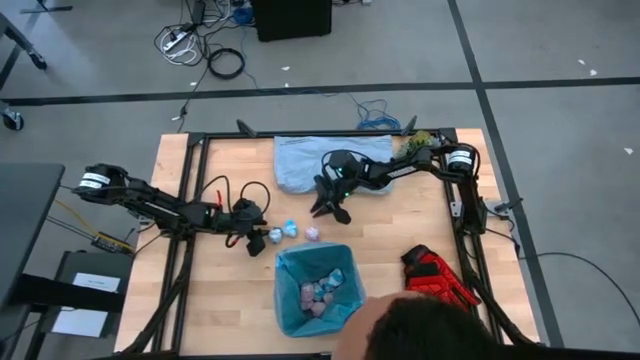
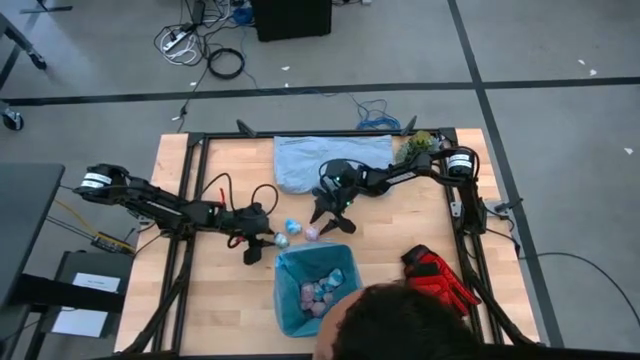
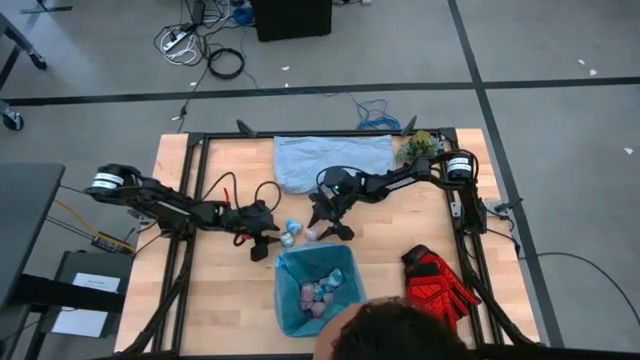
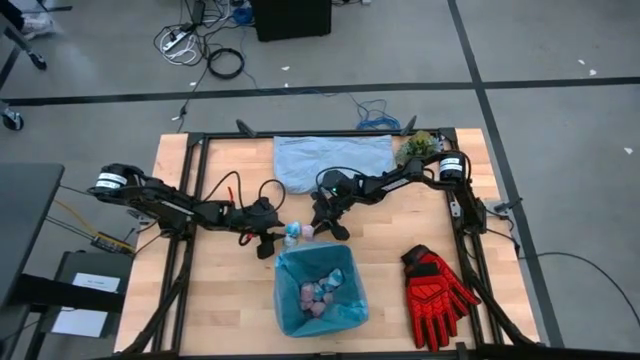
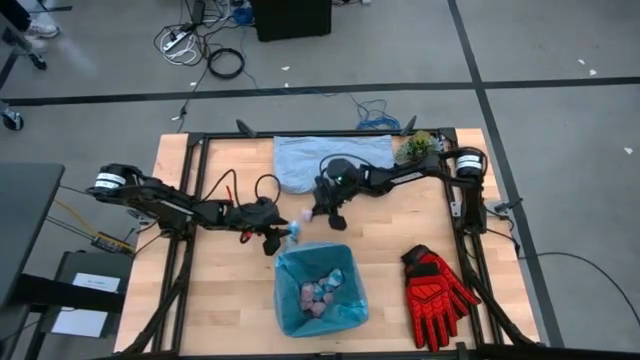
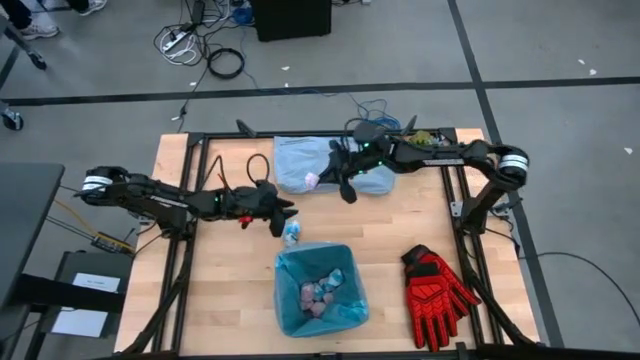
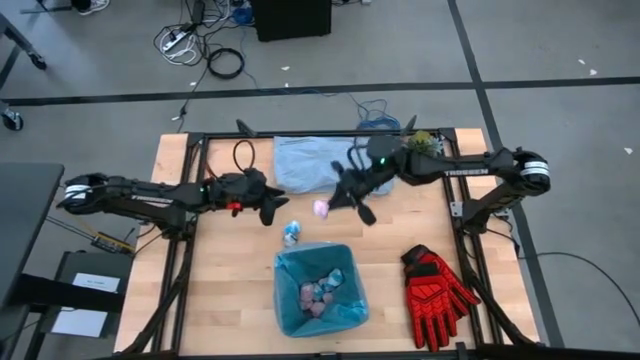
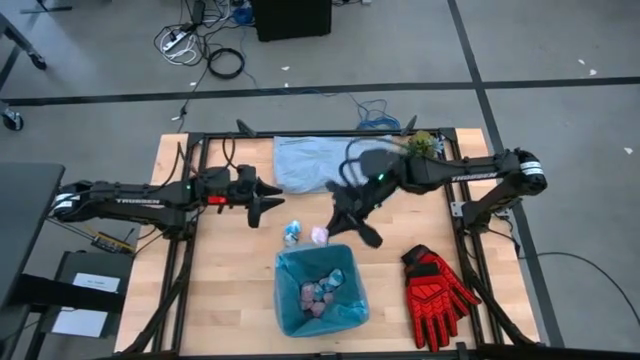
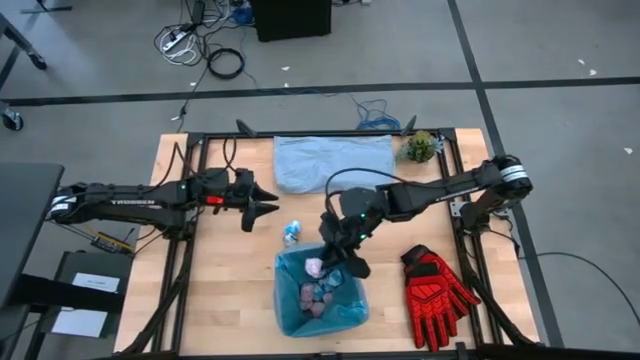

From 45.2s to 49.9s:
Task: place trash/remove bag and relplace
Put the pink crumbled trash bag into the trash bin

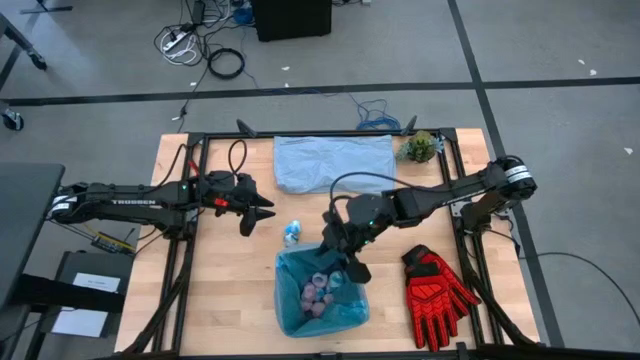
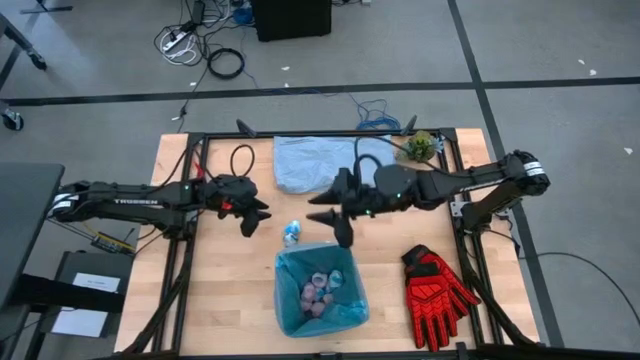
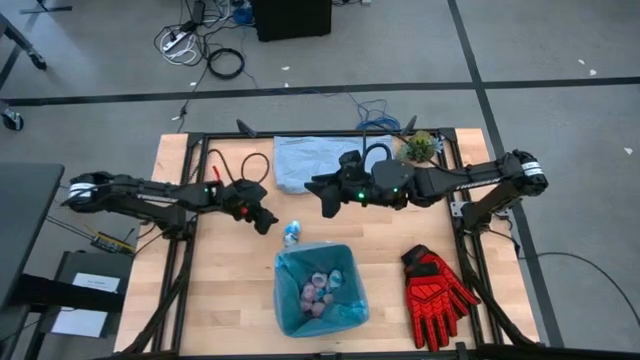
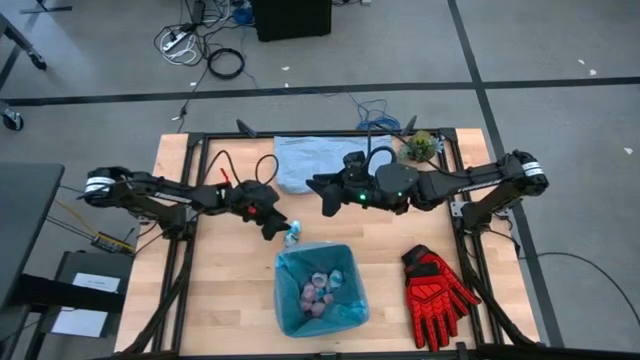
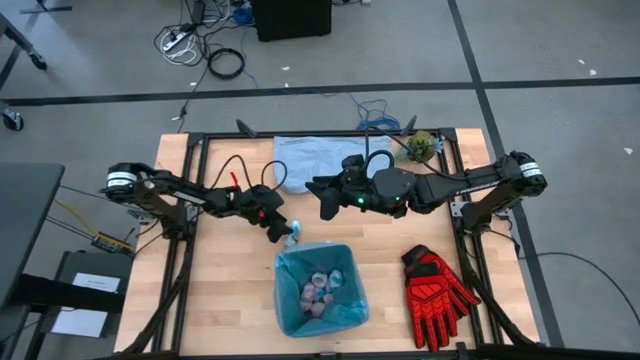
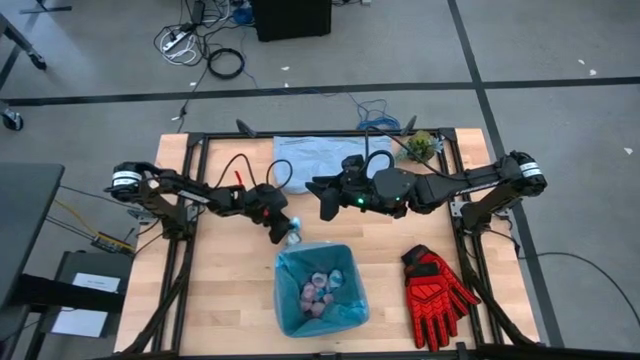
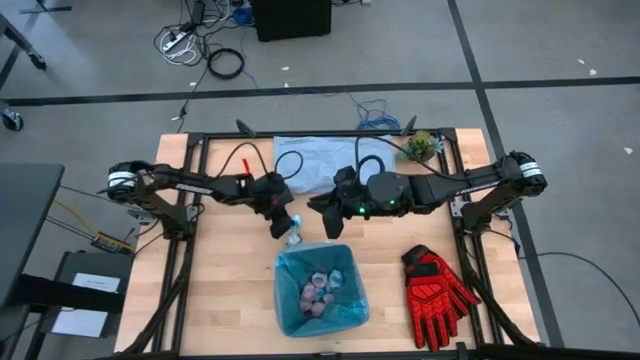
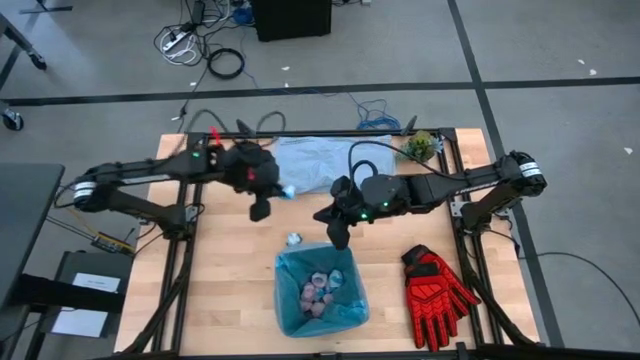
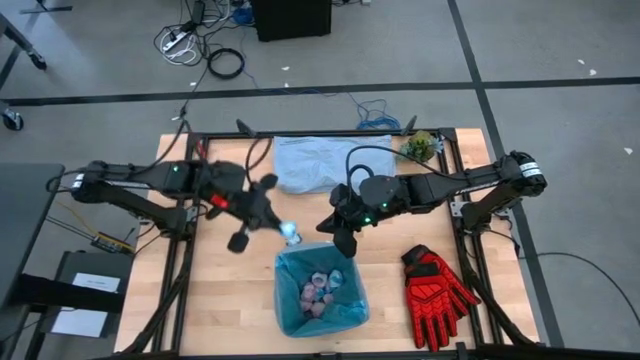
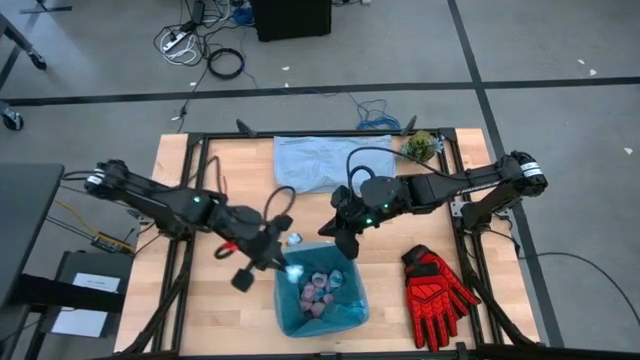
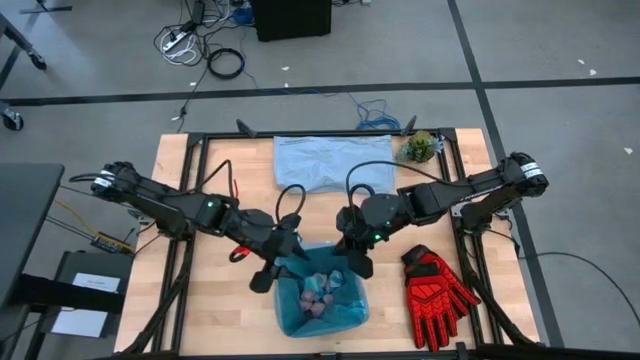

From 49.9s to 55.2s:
Put the blue crumbled trash bag into the trash bin

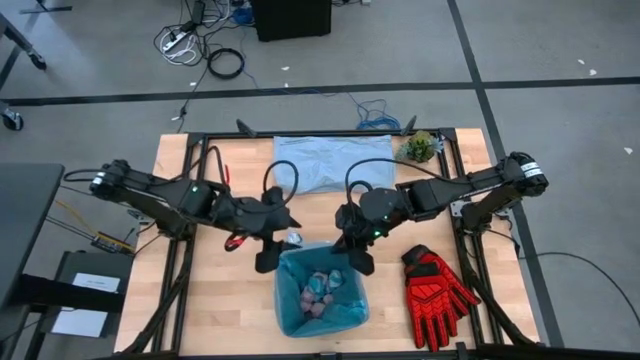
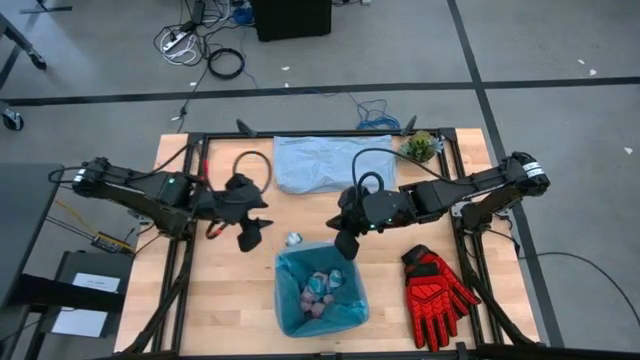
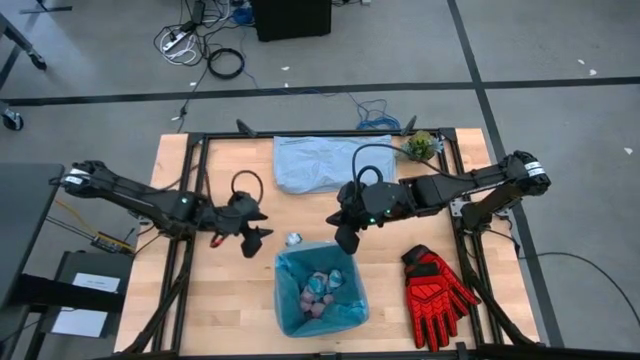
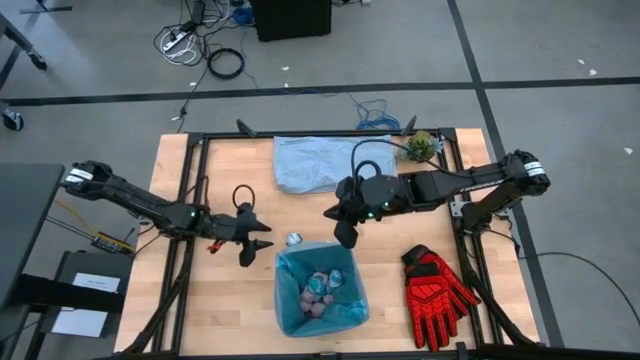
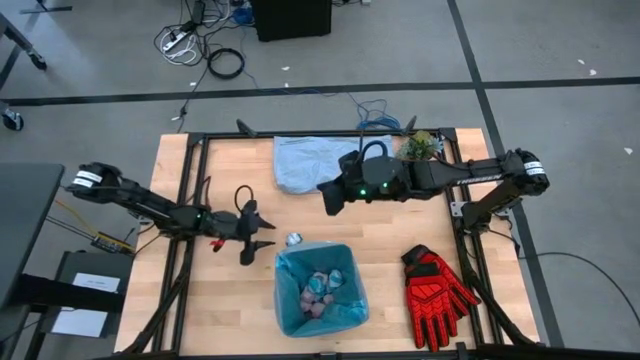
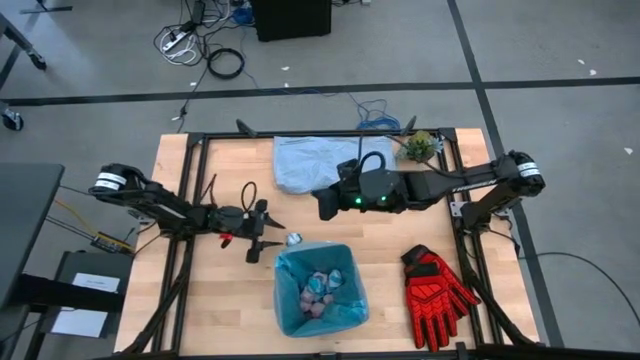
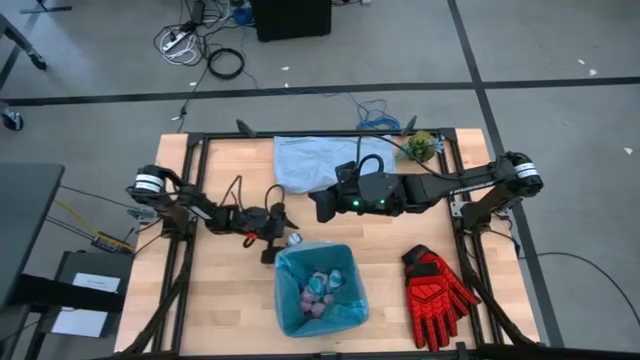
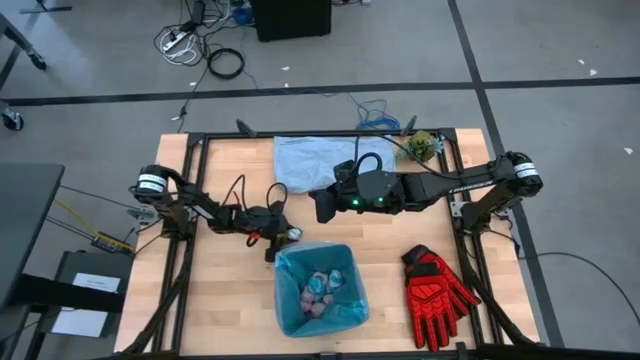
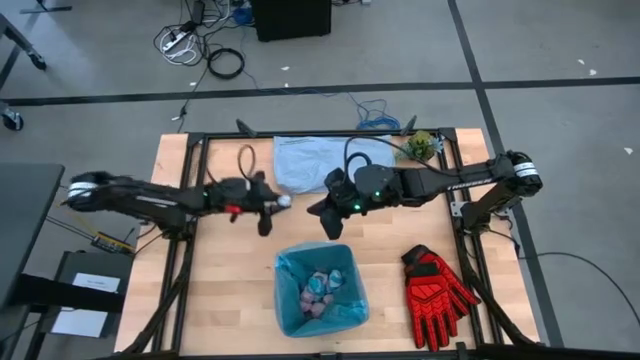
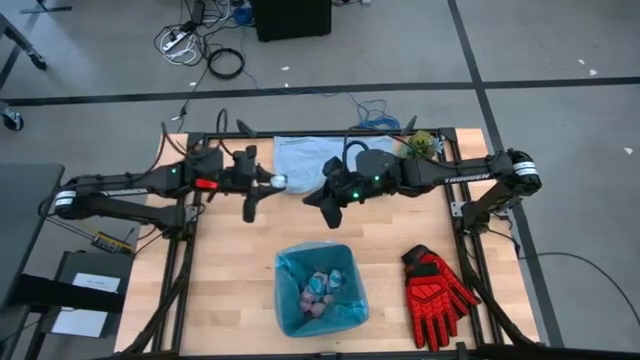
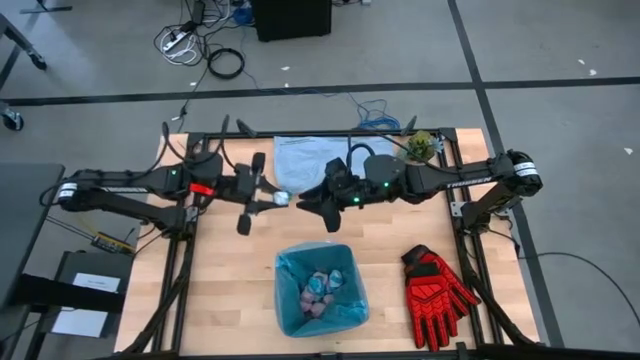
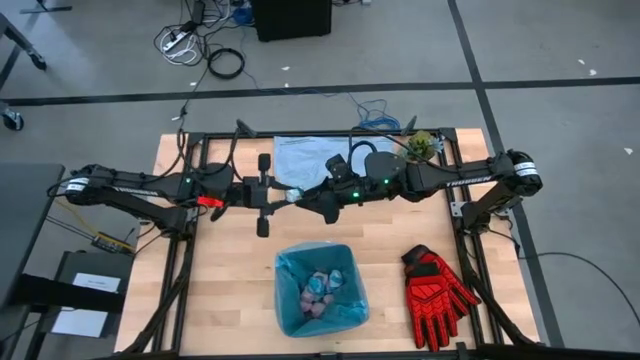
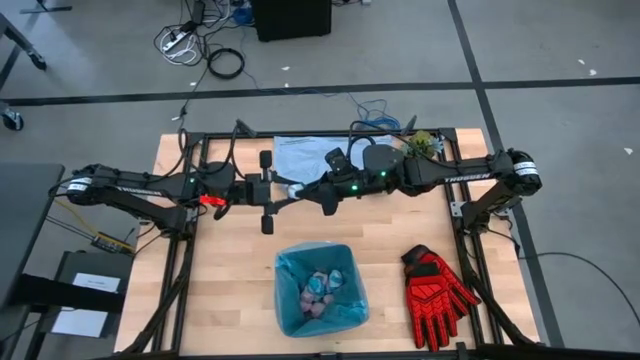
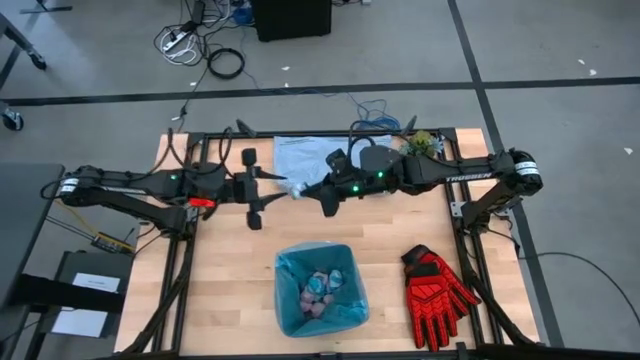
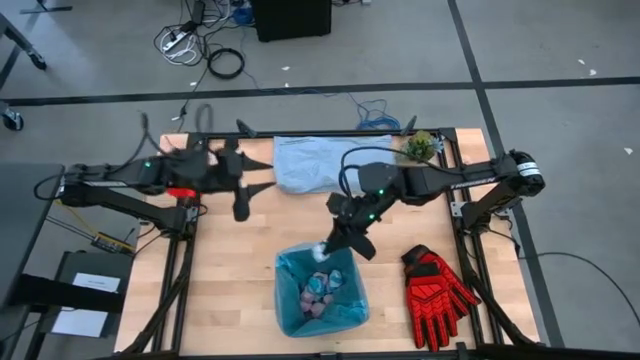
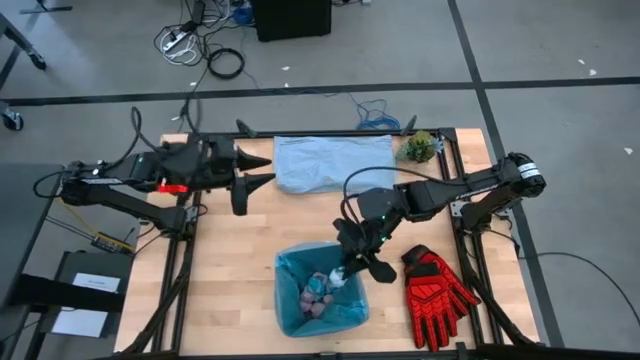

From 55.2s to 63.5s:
Put the blue crumbled trash bag into the trash bin

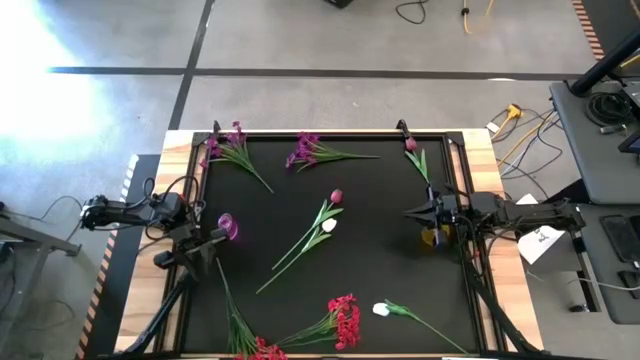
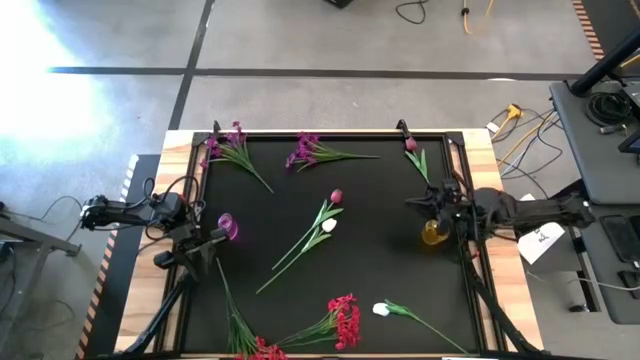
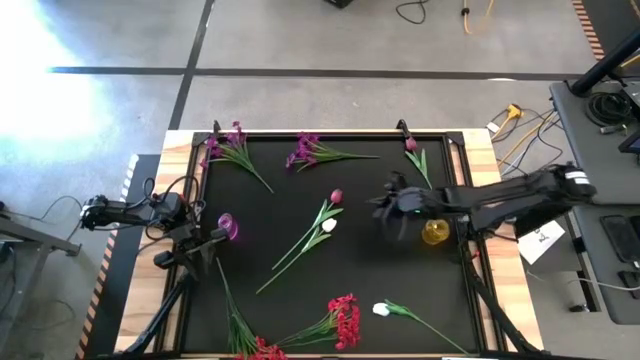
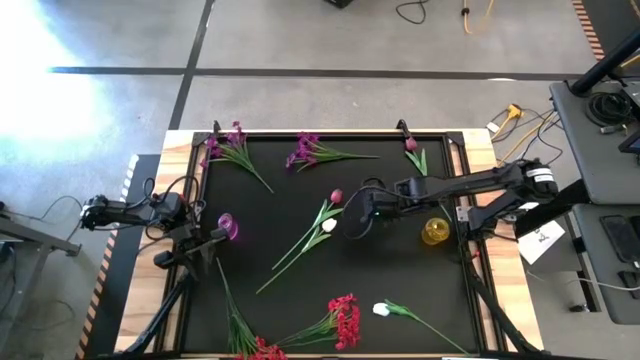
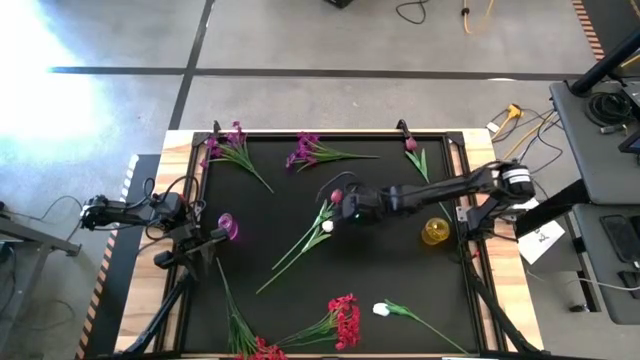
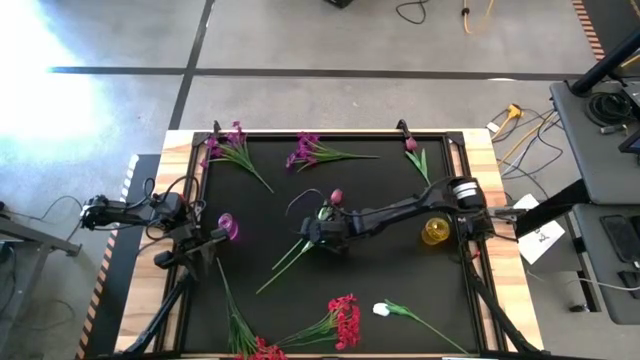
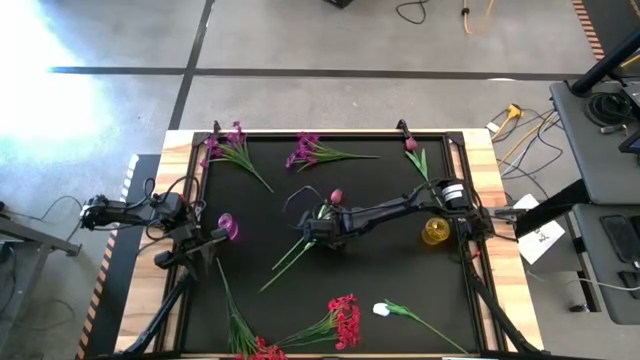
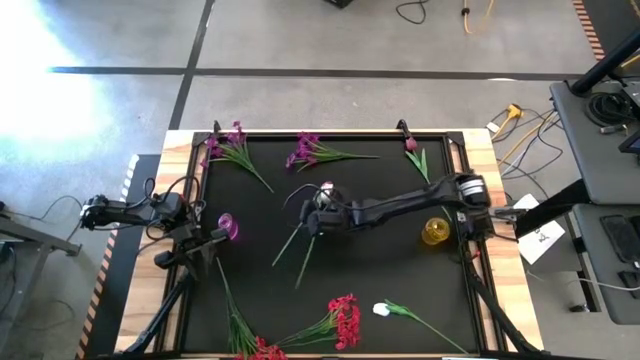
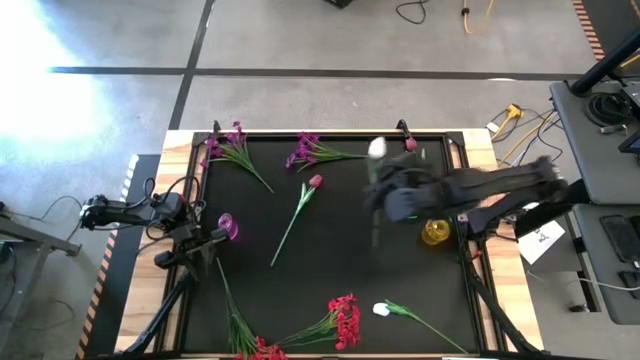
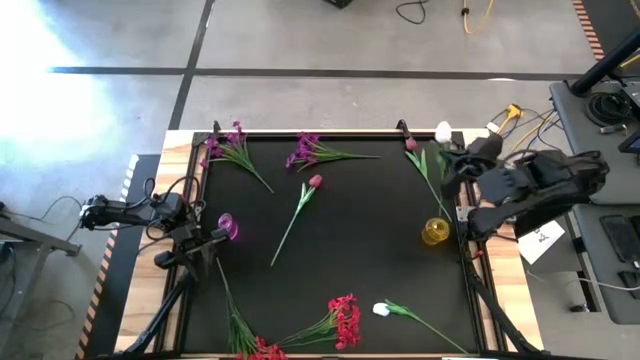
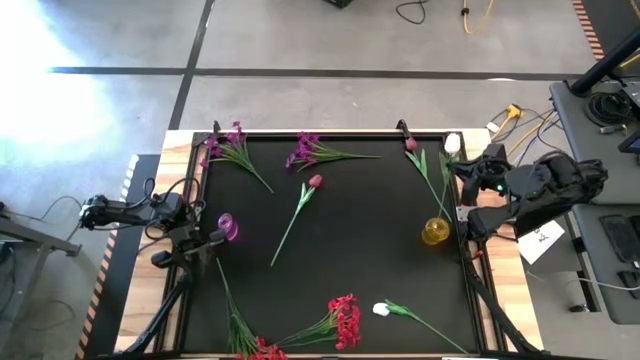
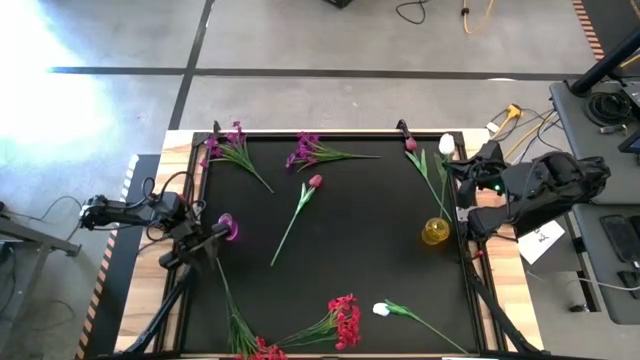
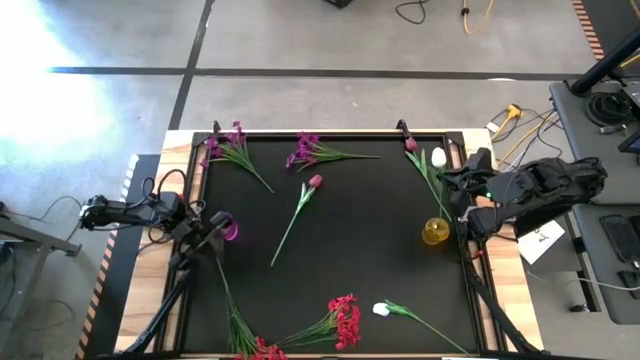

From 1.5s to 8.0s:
Task: Sort flowers into vase by color
Put the top white tulip into the yellow flower vase
